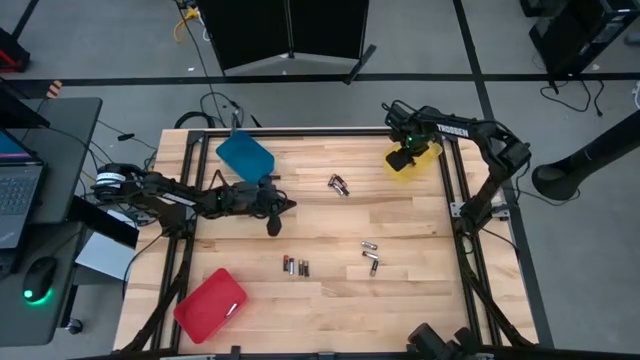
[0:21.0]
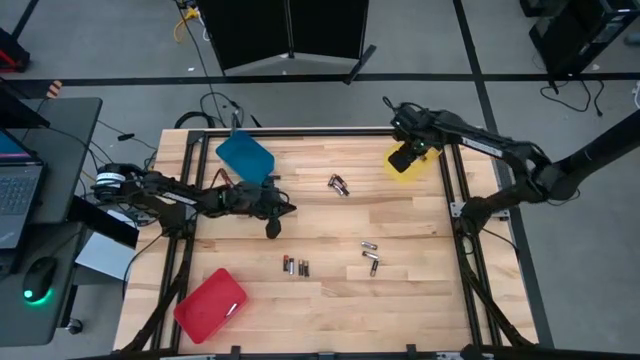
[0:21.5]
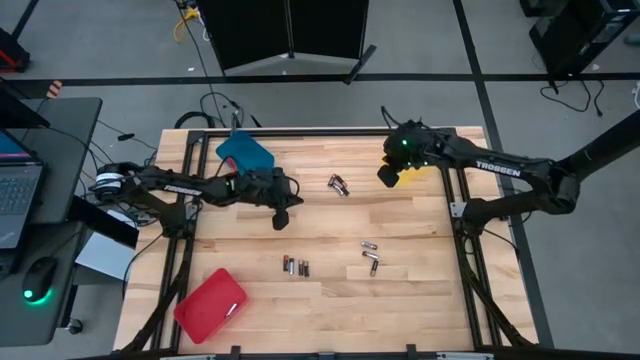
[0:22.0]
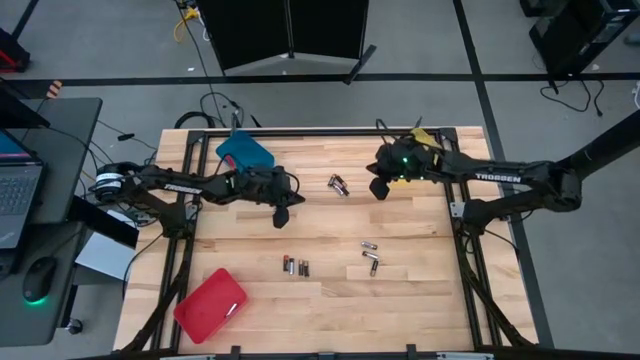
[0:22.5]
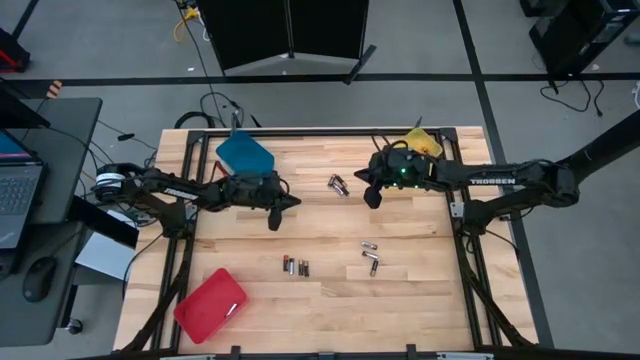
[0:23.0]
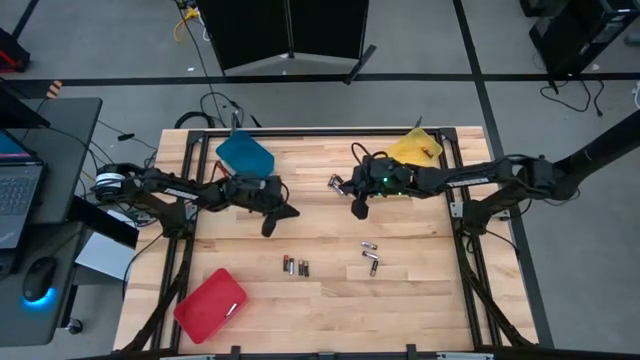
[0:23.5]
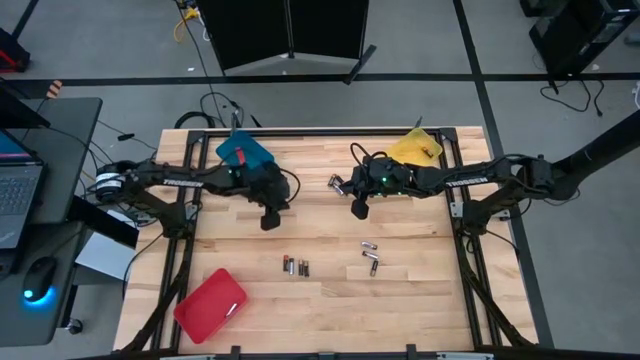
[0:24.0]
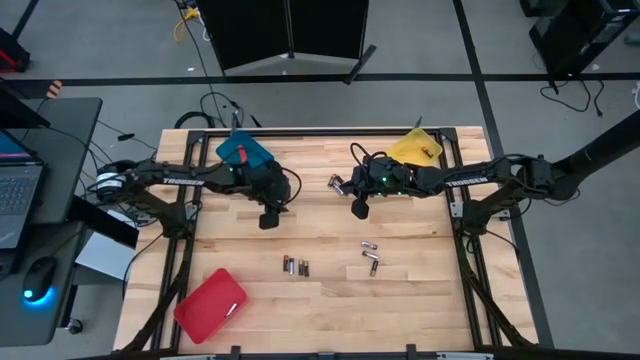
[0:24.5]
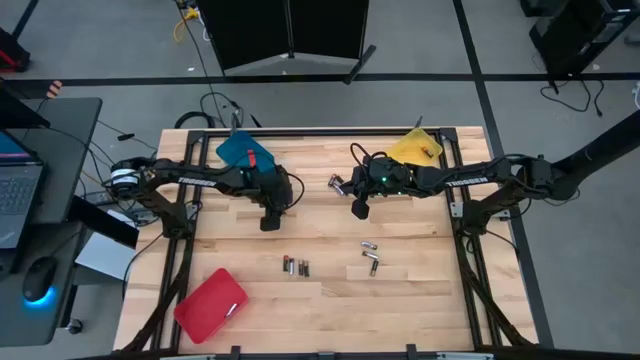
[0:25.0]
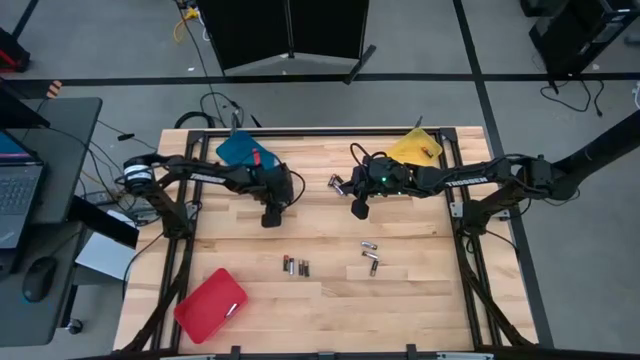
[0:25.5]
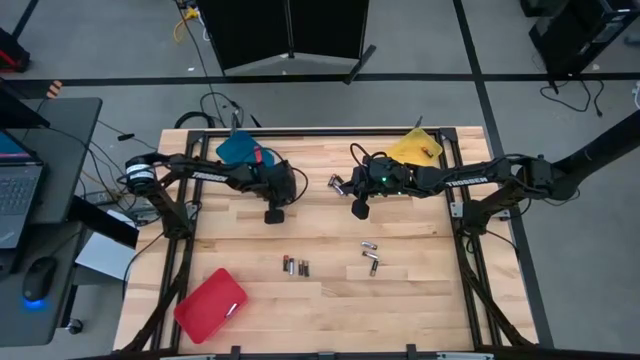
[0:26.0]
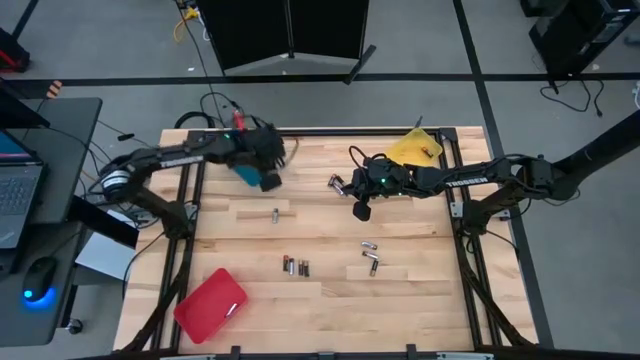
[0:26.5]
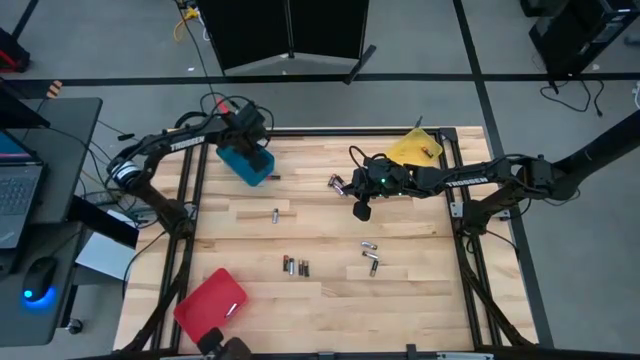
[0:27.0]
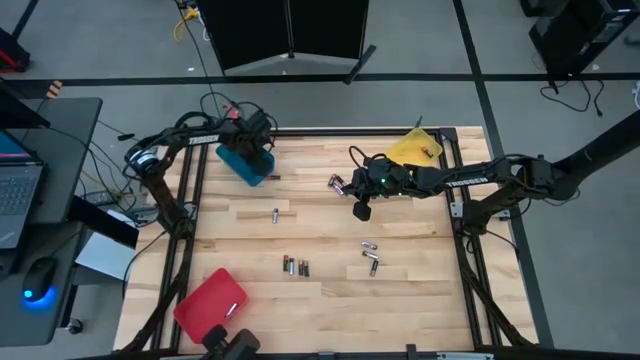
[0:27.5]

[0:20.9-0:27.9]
Task: Sort batteries
Put the black brown battery into the blue bin

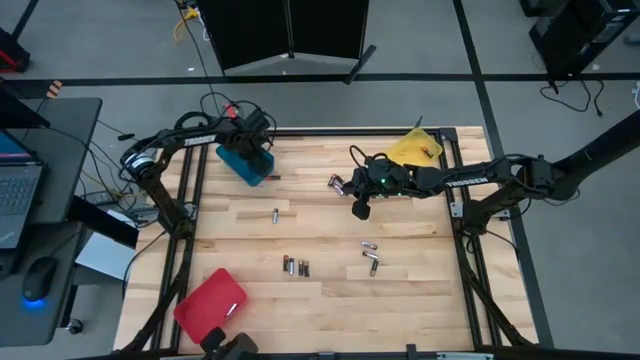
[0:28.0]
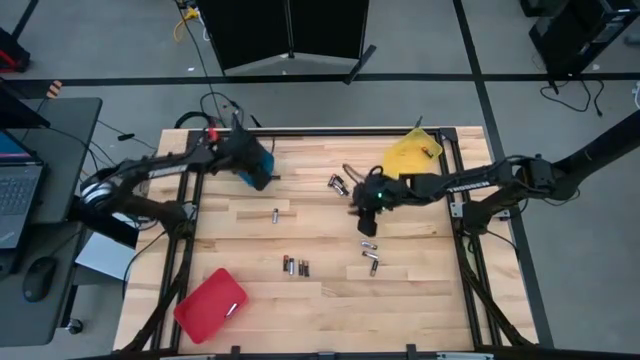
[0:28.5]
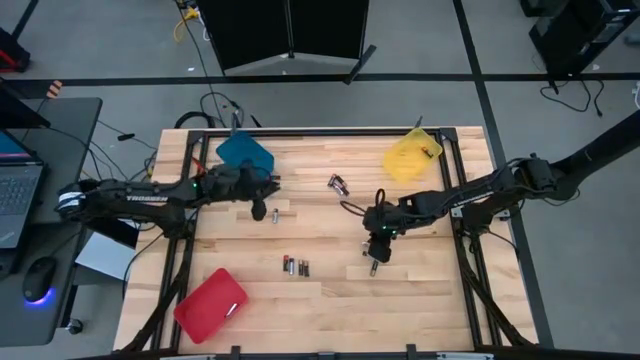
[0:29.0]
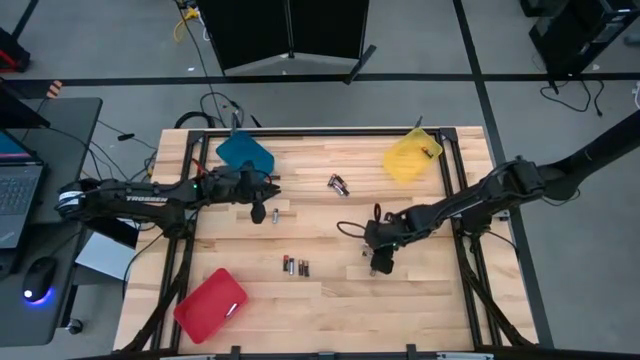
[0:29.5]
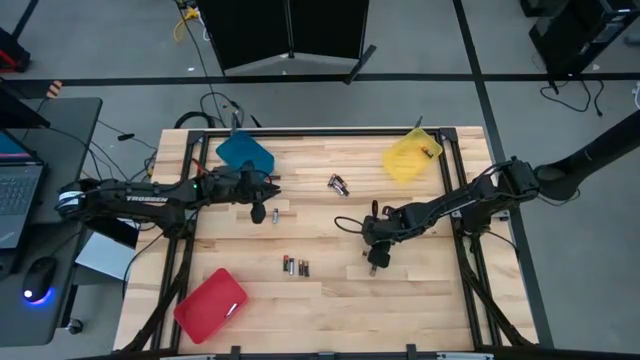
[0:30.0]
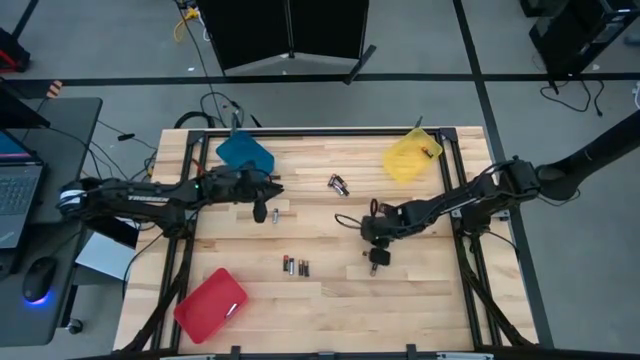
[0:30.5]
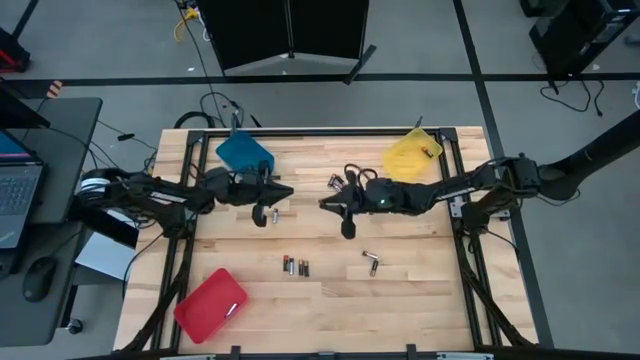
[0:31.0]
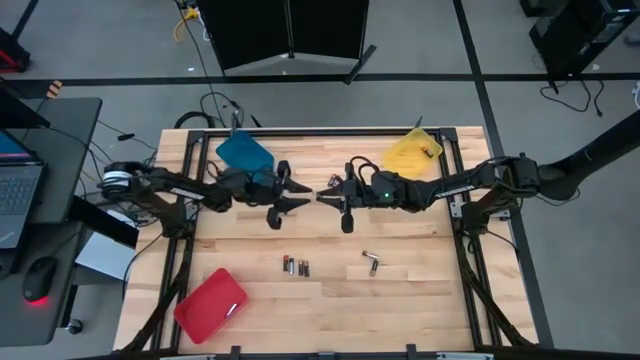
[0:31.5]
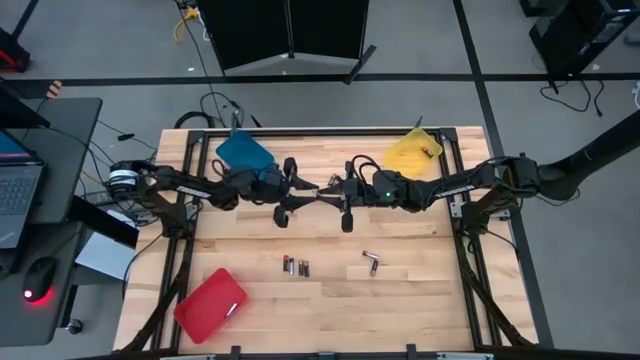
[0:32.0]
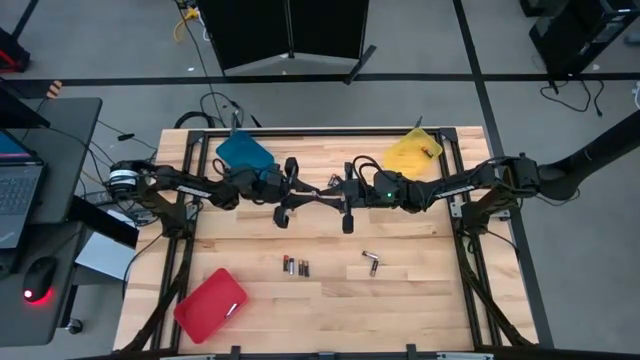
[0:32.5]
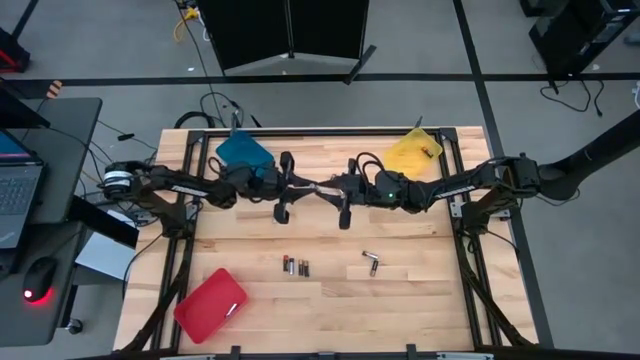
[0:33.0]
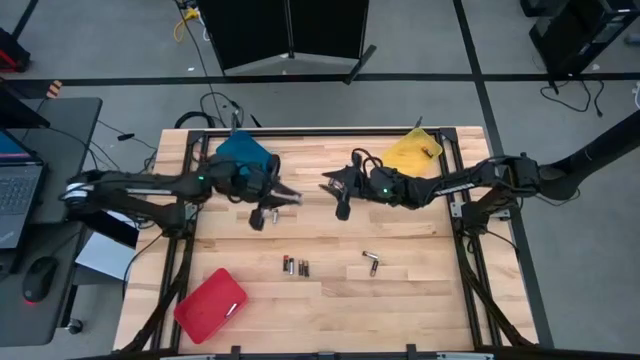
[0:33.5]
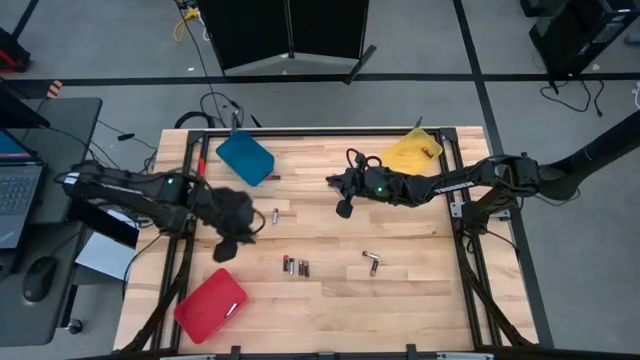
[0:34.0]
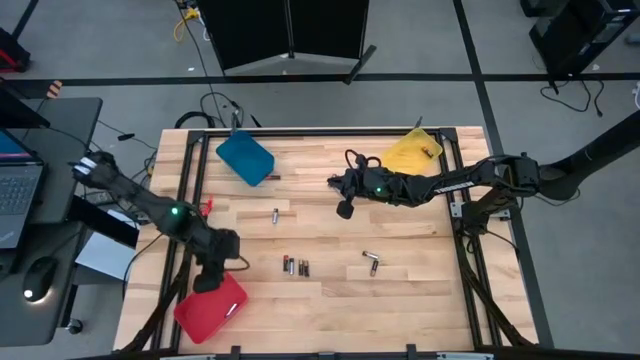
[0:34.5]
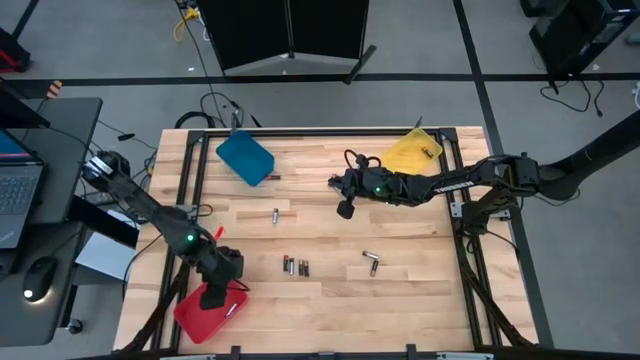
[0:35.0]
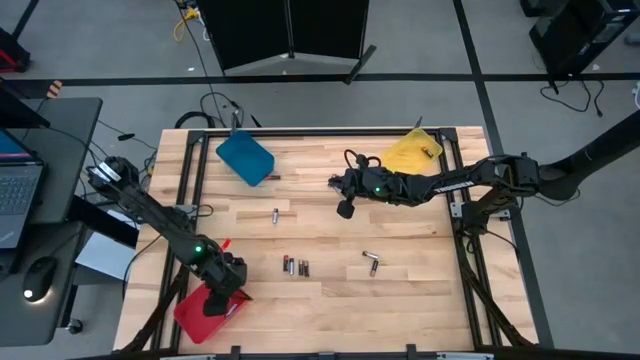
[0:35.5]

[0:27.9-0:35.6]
Put the black silver battery into the red bin

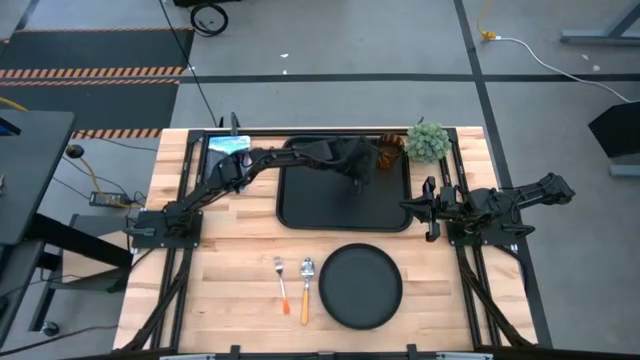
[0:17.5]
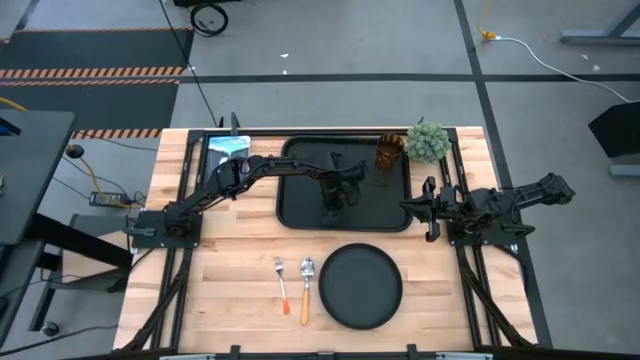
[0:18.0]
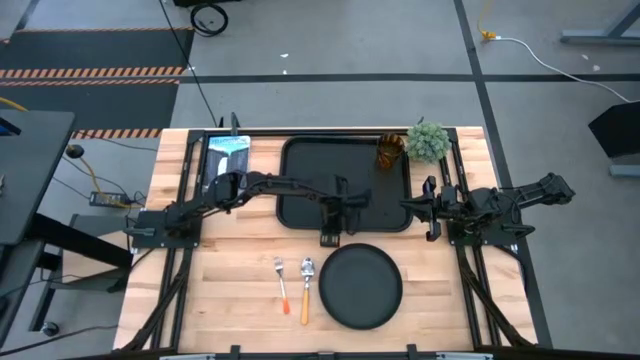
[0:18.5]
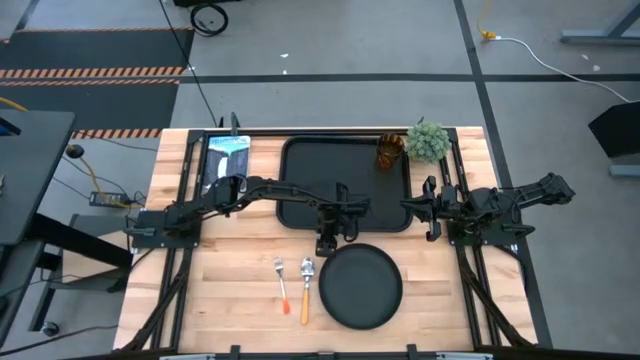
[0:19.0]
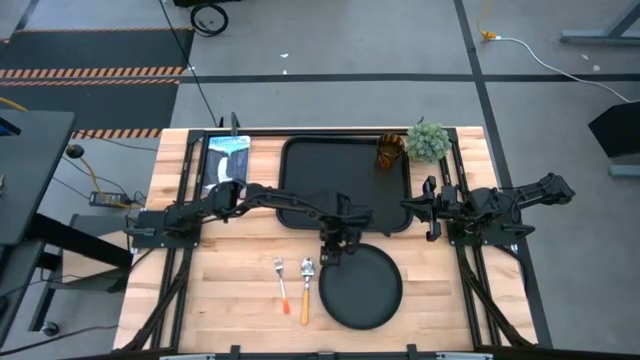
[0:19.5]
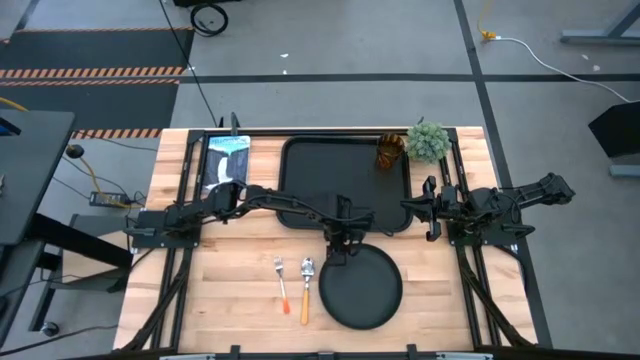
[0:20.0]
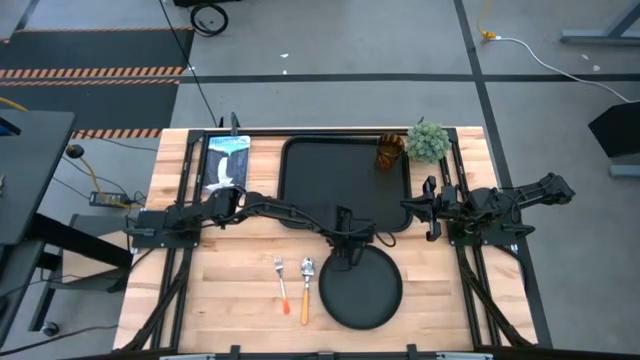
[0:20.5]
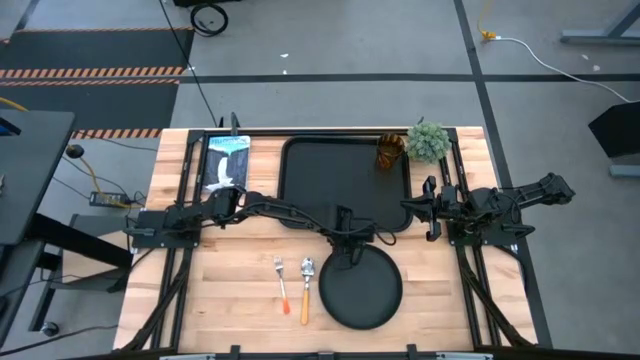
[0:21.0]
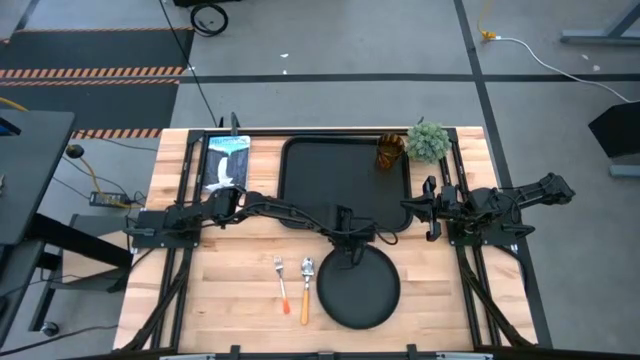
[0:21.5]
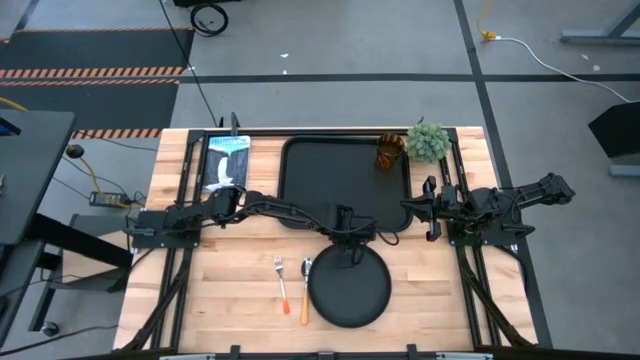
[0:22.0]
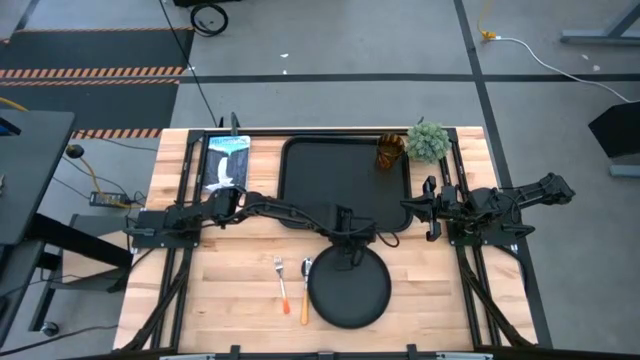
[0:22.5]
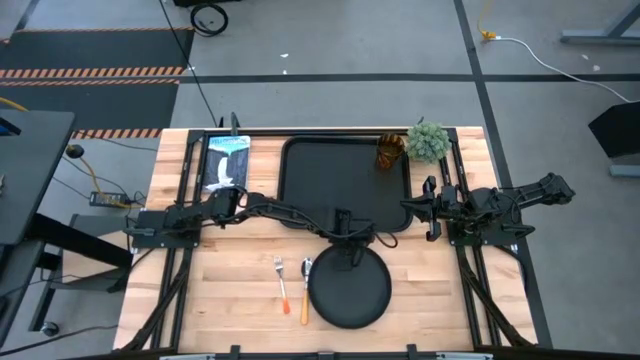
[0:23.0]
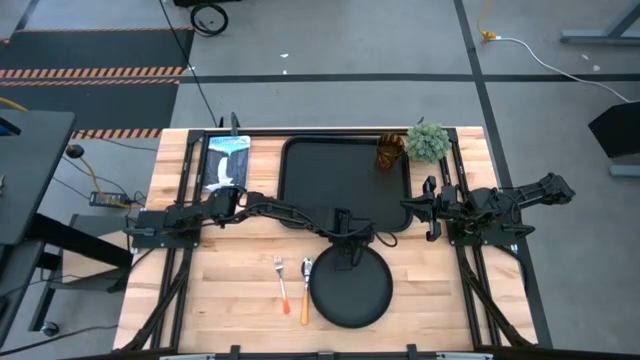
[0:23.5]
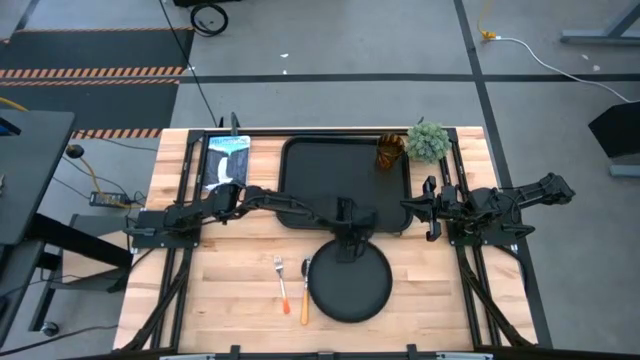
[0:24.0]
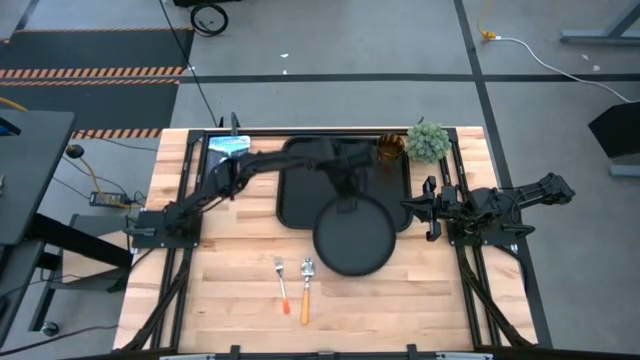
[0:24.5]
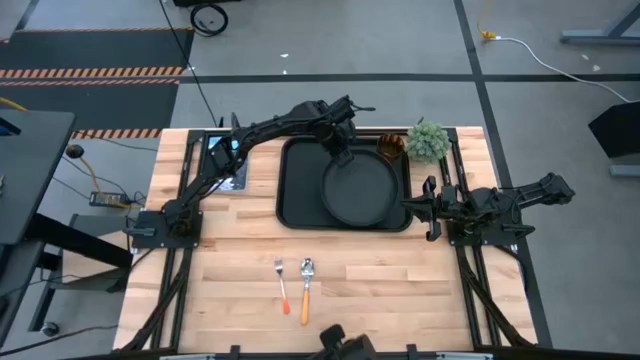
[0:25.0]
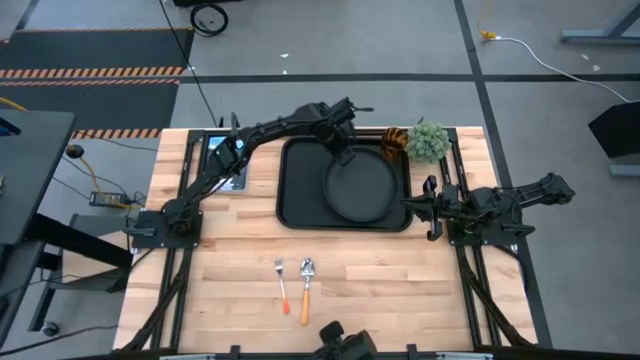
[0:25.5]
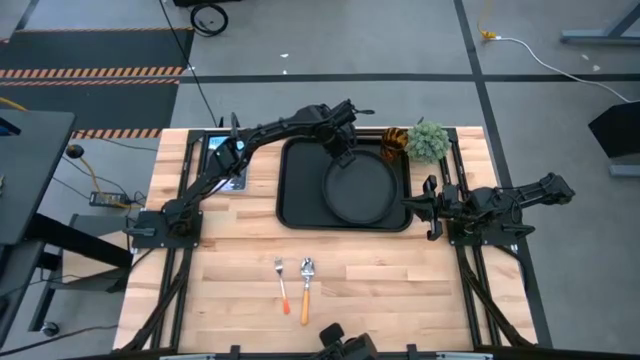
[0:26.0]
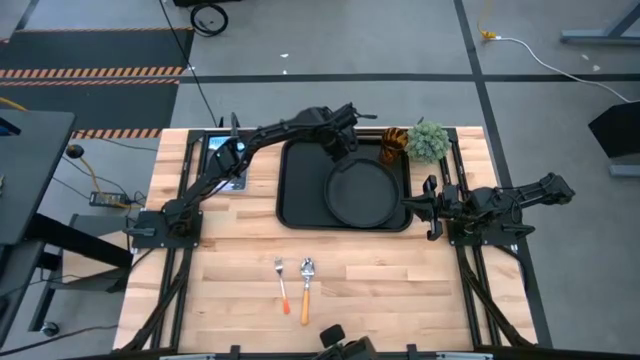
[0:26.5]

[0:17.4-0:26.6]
Task: Pick and place plate/cup/fork/spoon on tray
Put the black plate on the right side of the black tray
